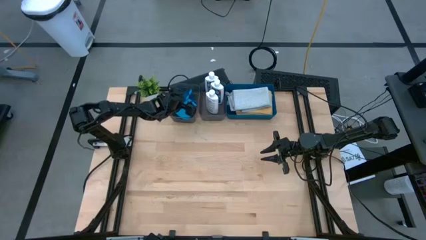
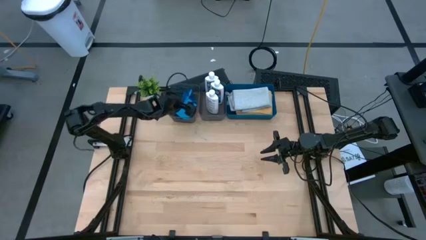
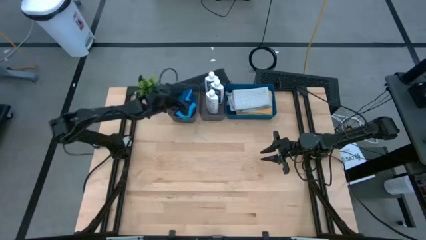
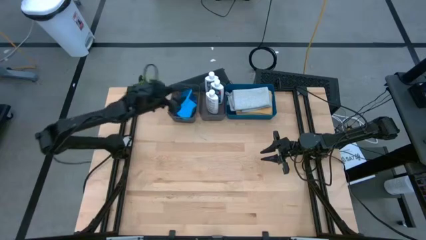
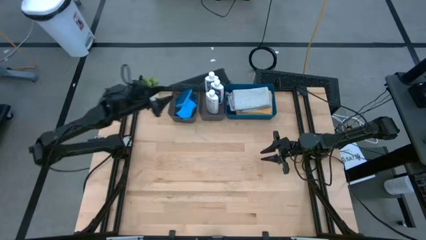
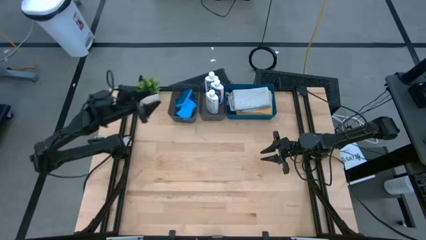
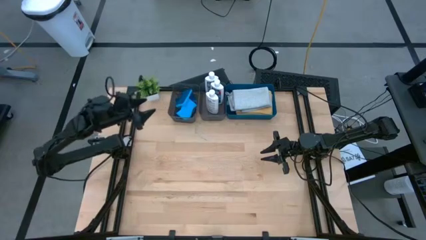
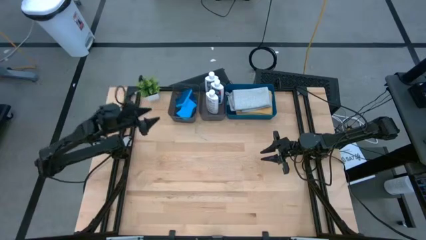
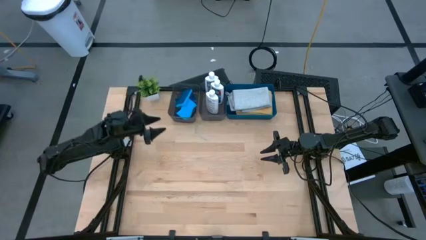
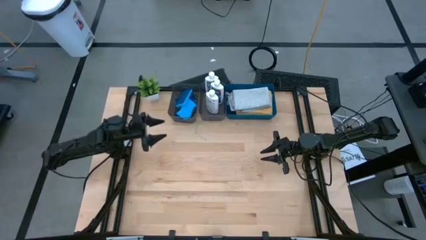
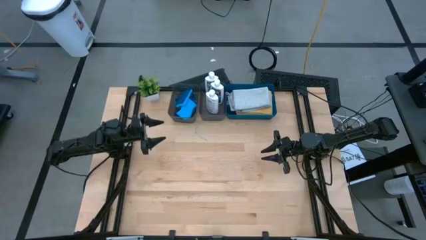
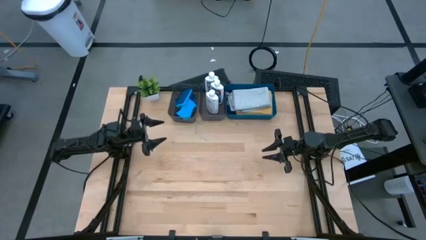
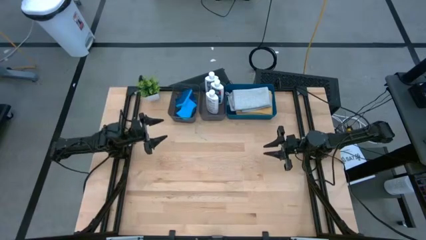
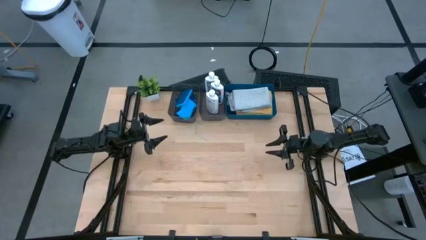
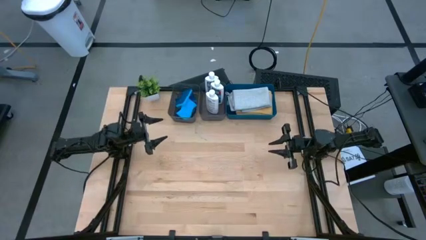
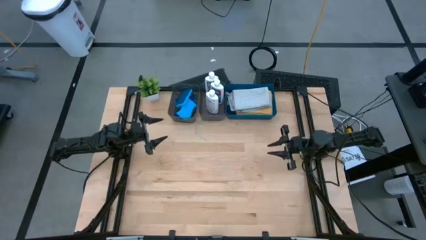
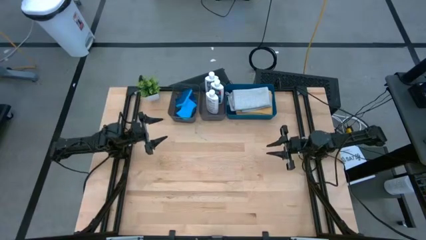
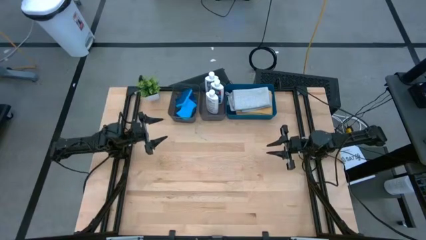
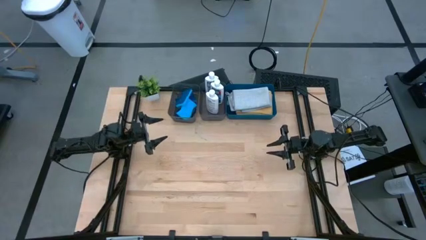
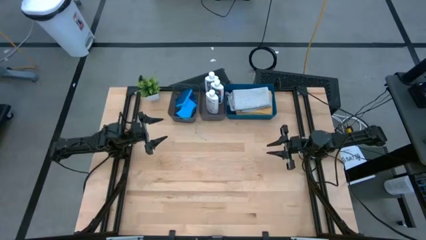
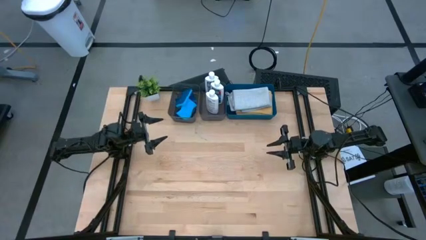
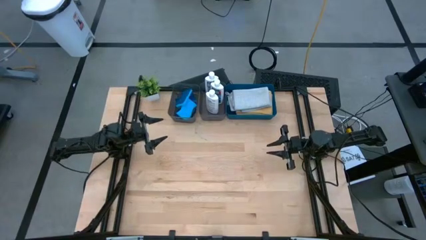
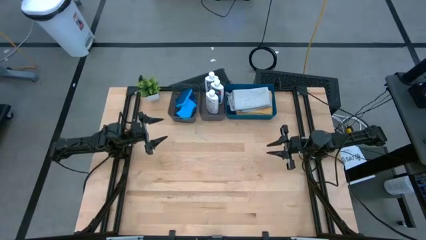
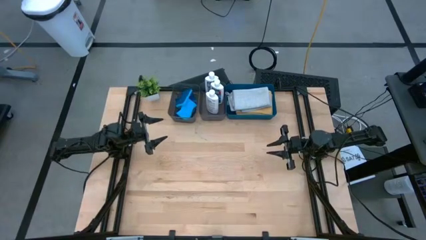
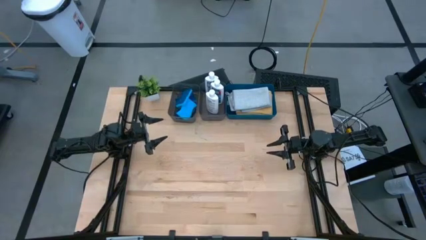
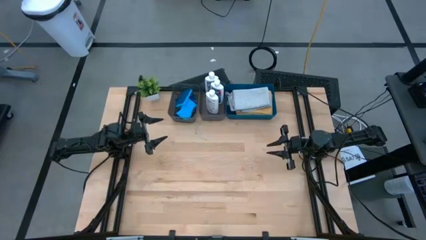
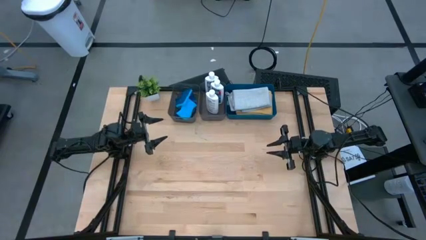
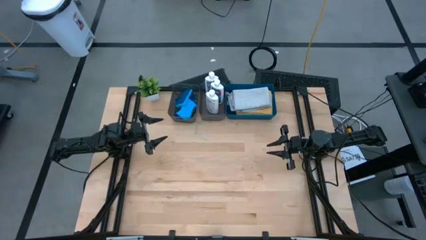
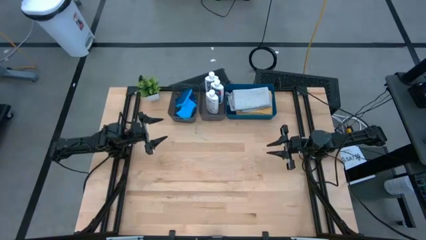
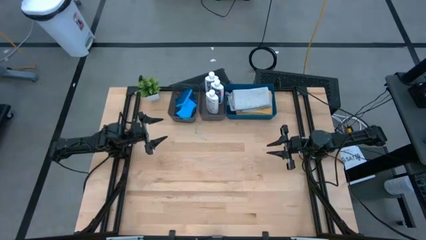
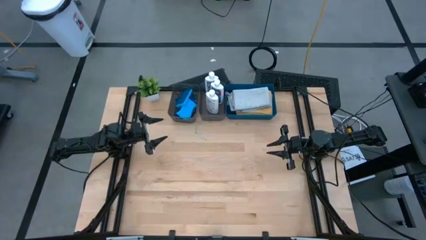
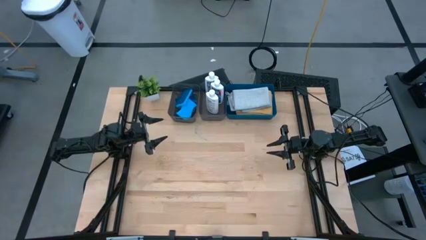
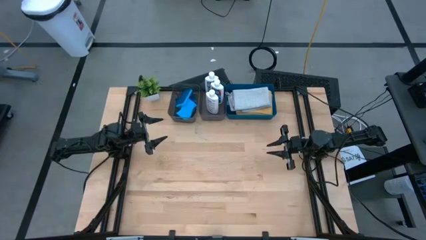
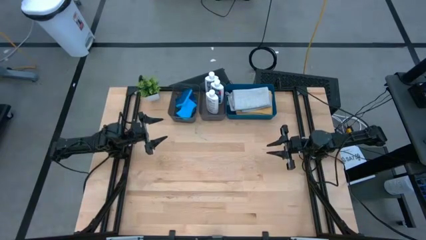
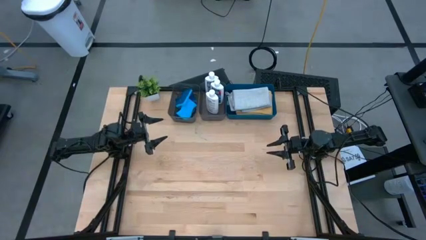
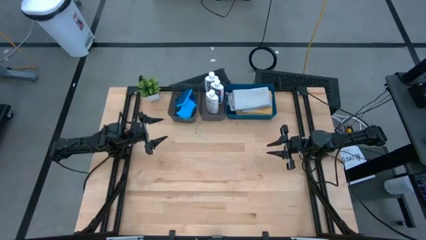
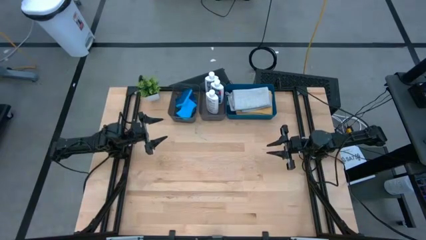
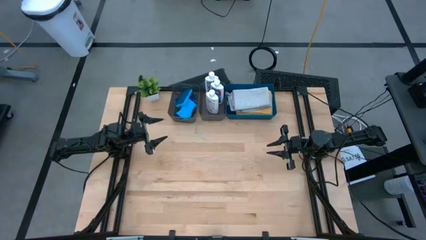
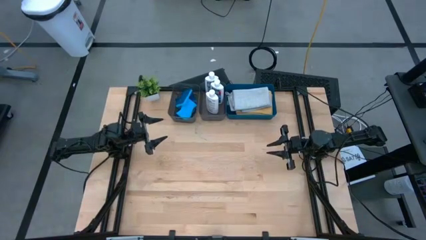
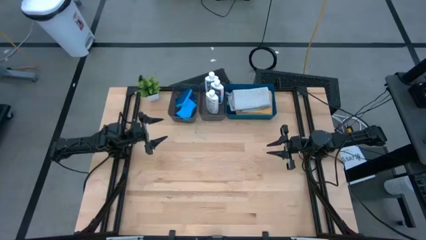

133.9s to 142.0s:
Task: Pick & Place Kitchen Items
Return to Home Position

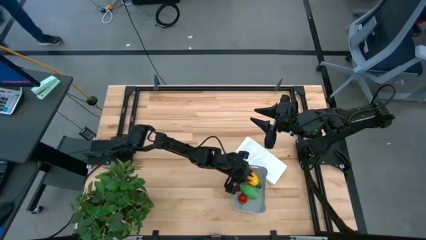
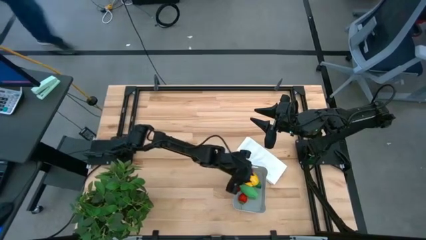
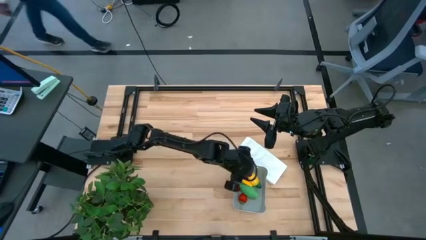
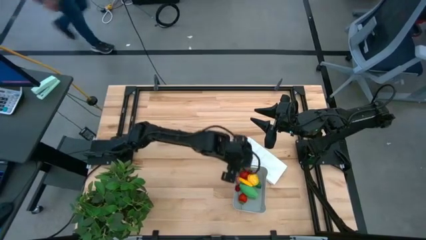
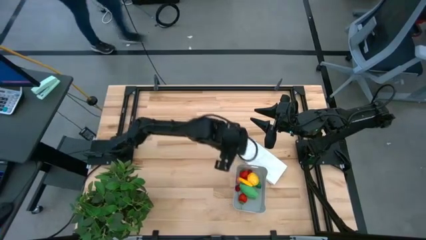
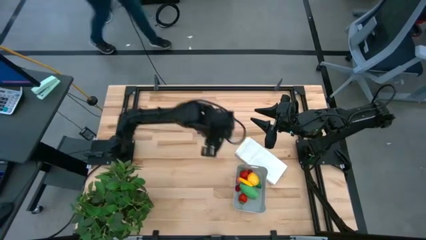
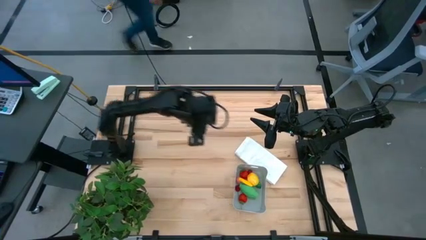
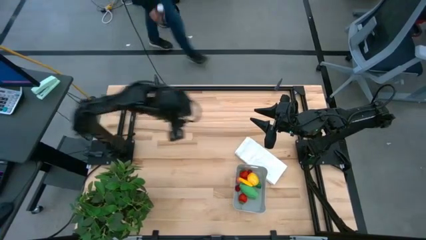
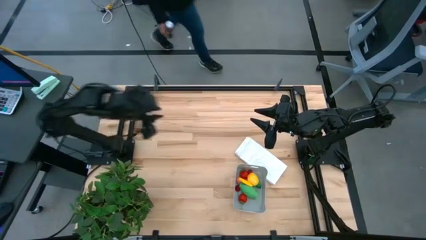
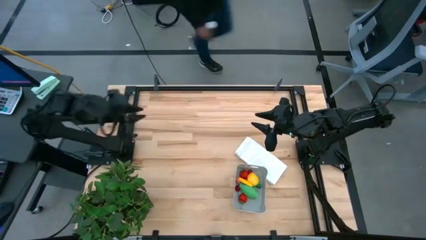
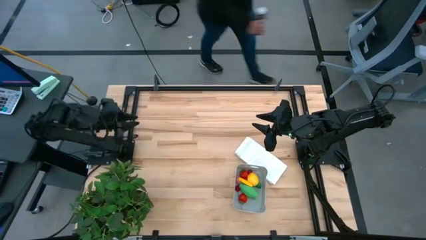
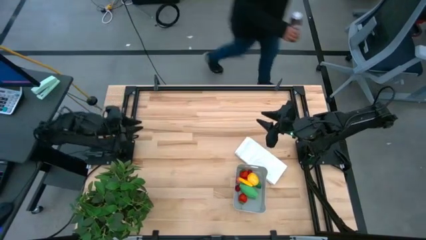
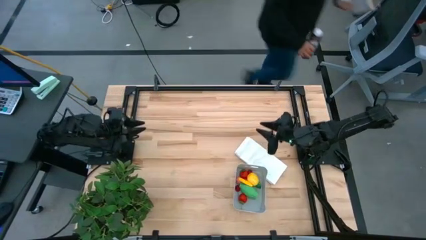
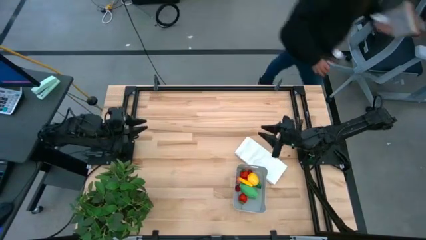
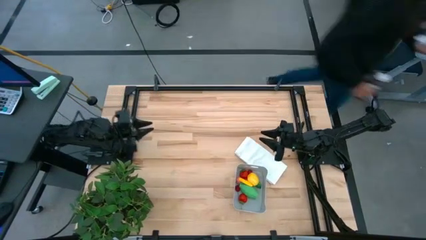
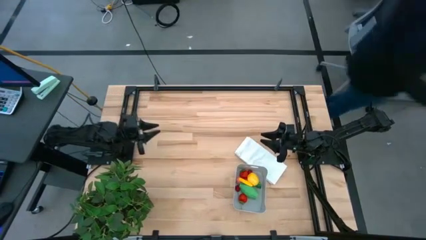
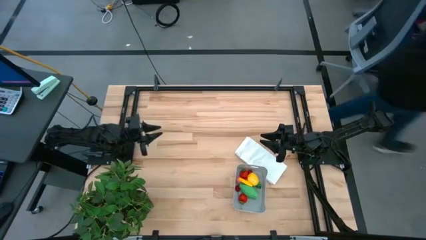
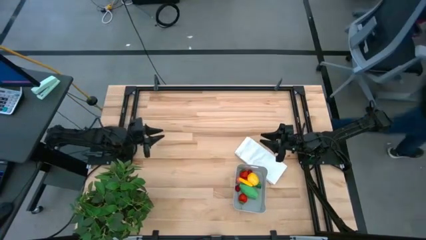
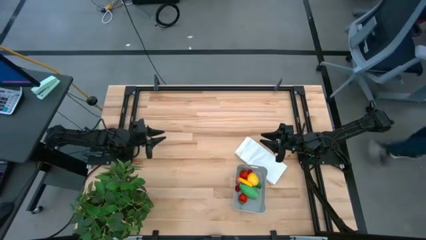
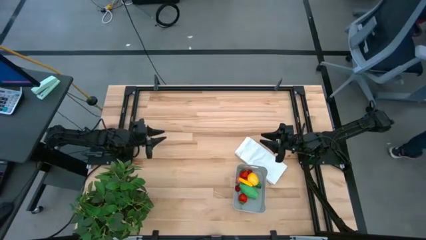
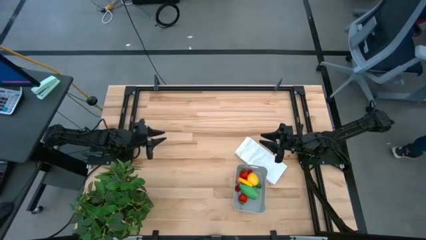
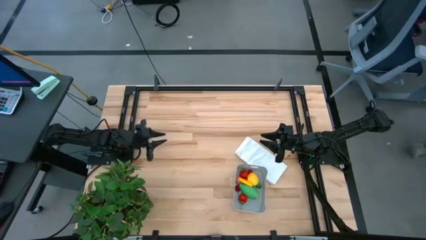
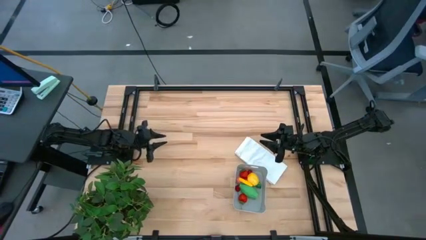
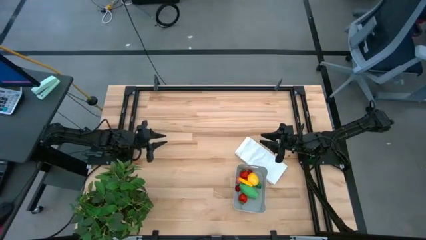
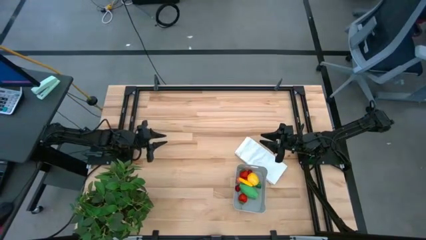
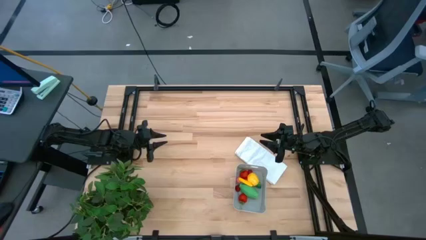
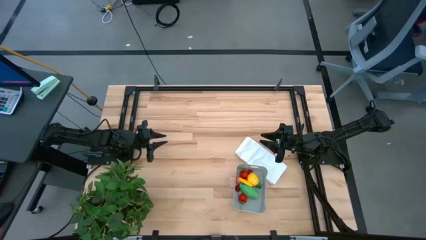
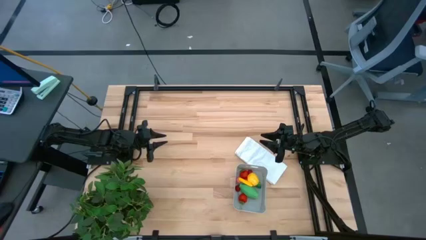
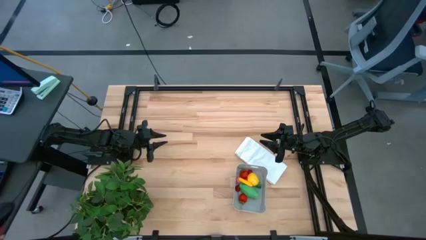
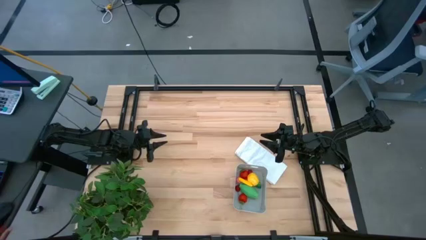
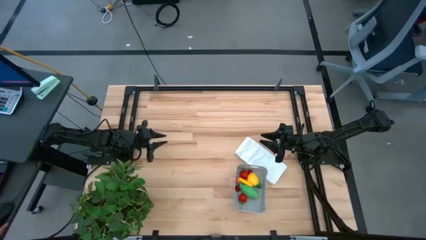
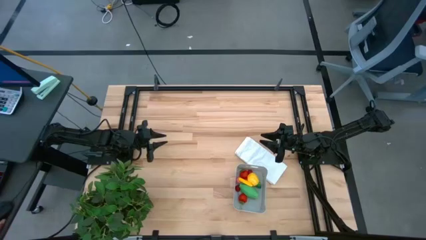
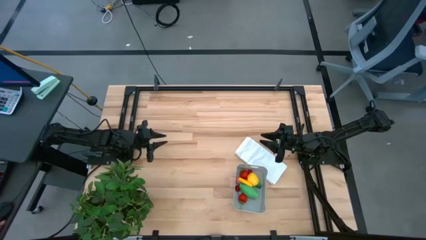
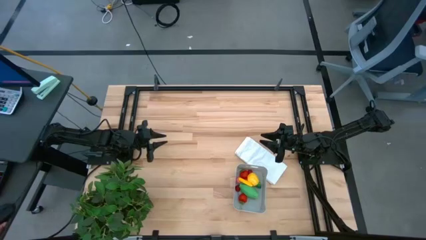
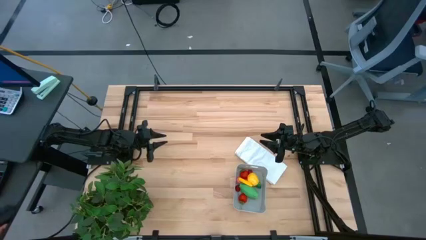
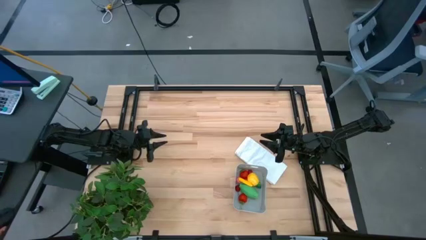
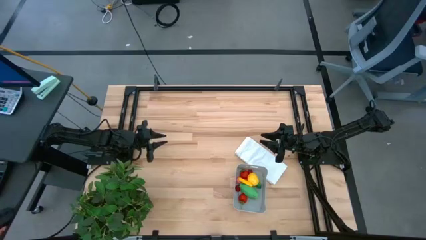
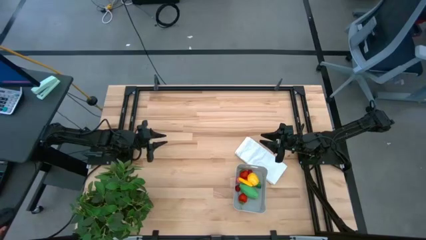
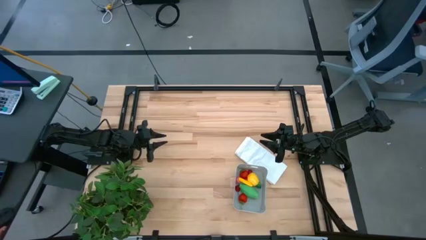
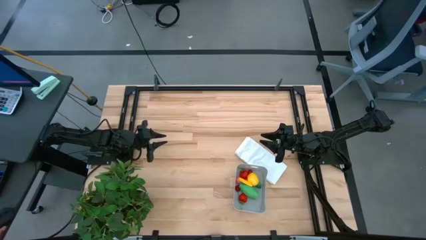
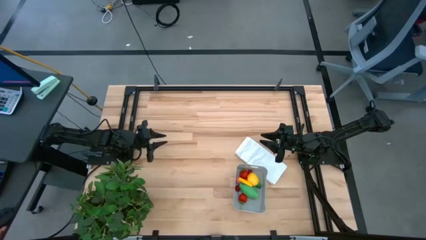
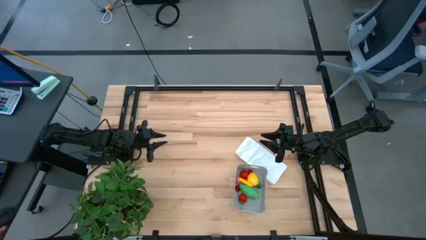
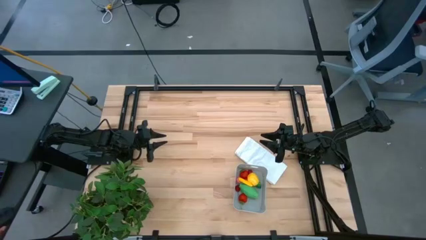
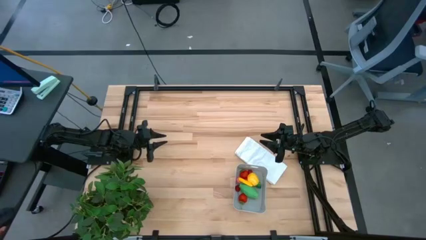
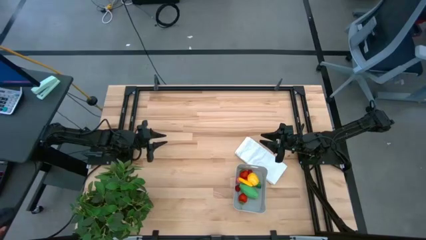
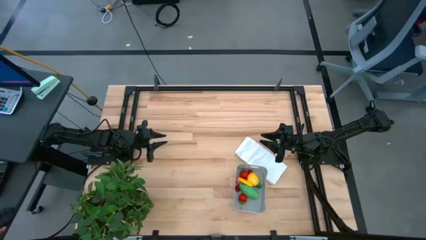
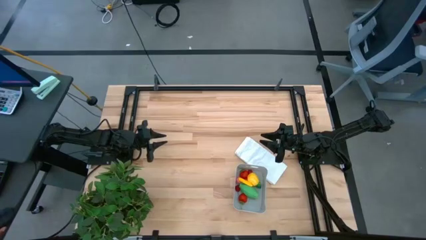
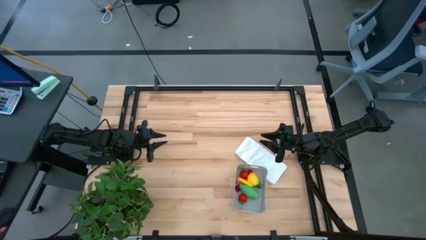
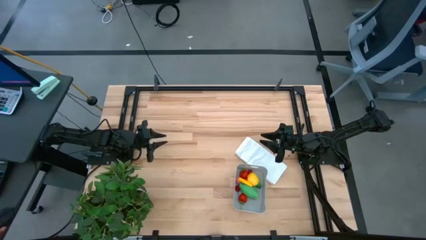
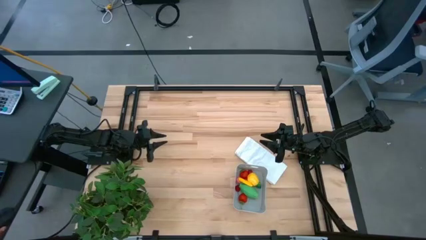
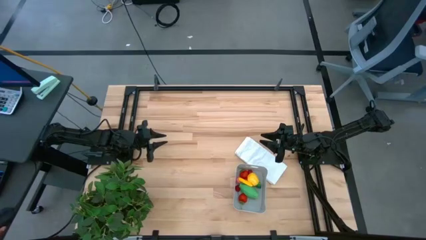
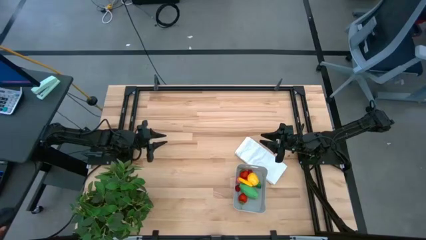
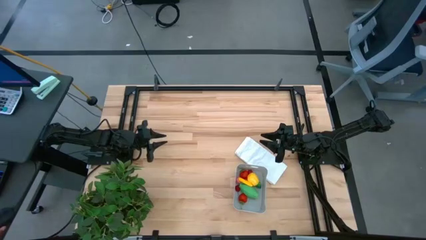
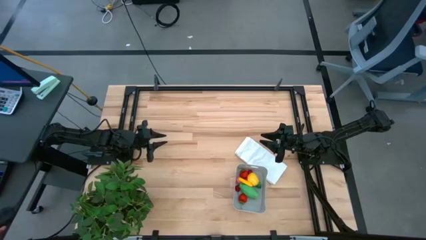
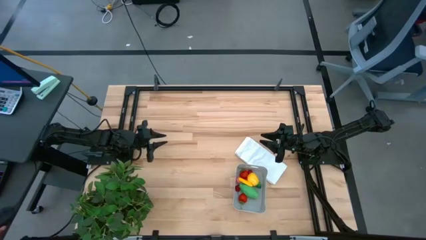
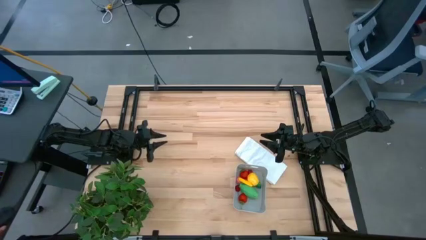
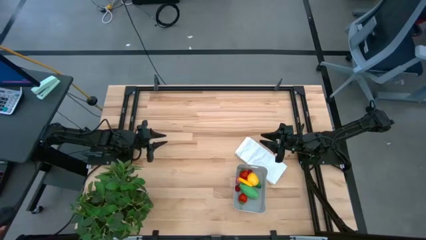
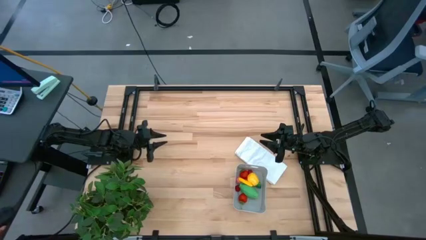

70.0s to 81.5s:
Task: Pick and placing Produce into tupperware
Return to Home Position
